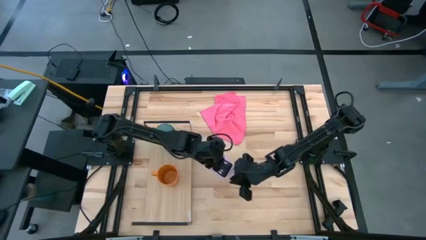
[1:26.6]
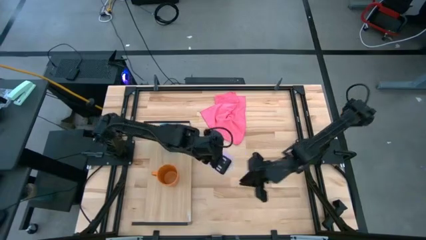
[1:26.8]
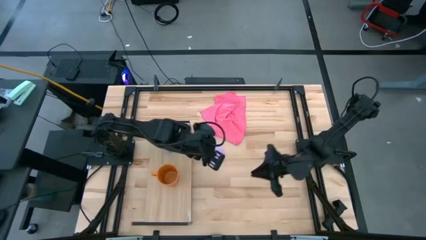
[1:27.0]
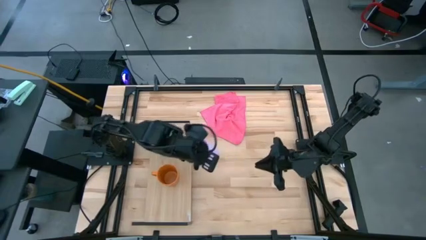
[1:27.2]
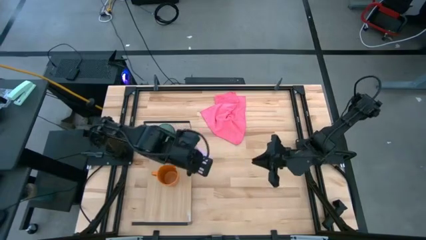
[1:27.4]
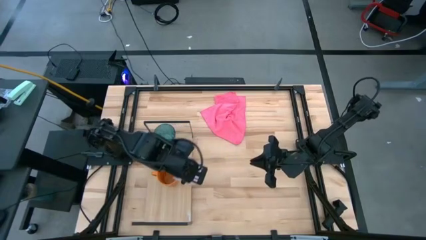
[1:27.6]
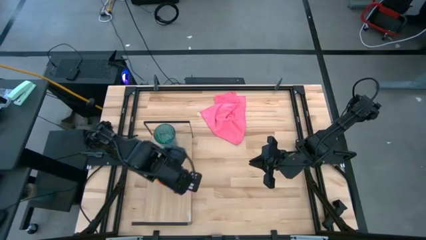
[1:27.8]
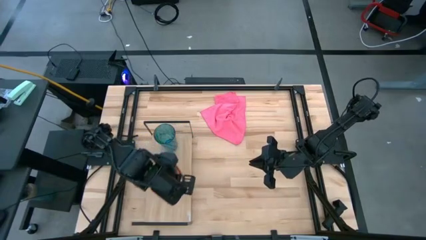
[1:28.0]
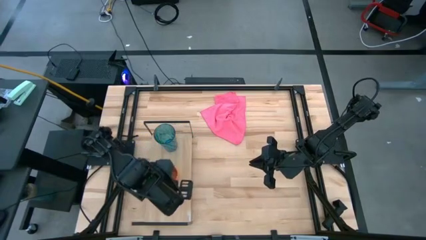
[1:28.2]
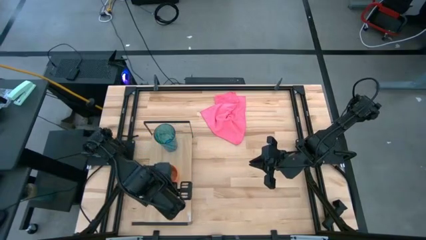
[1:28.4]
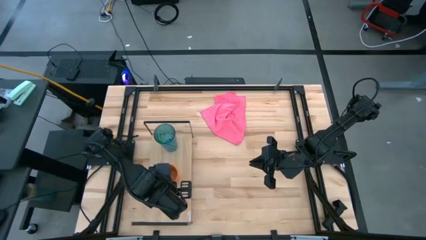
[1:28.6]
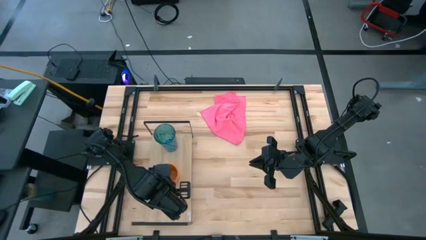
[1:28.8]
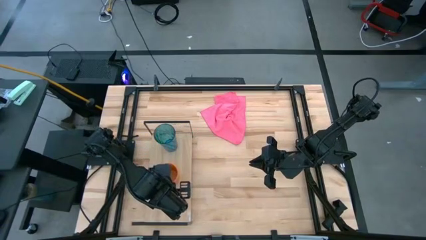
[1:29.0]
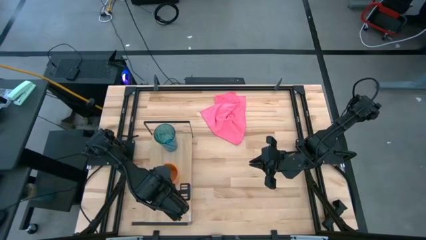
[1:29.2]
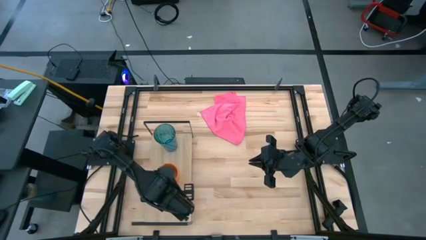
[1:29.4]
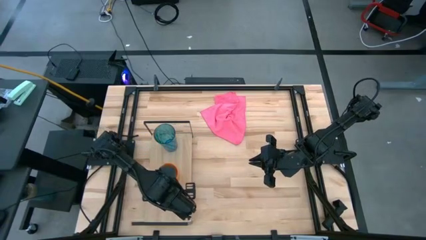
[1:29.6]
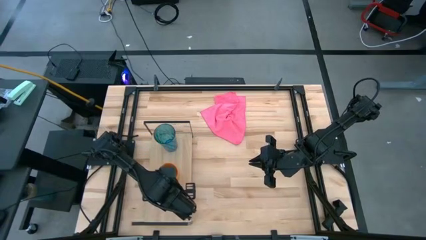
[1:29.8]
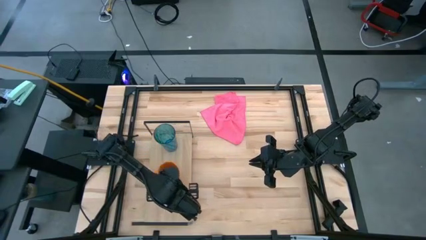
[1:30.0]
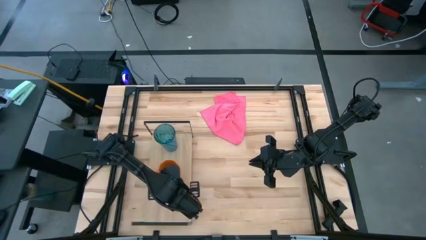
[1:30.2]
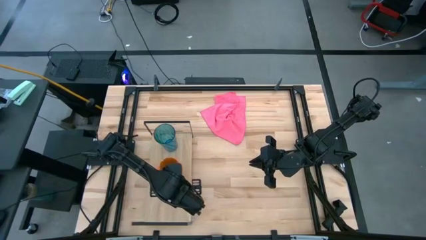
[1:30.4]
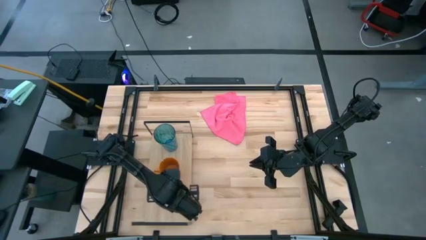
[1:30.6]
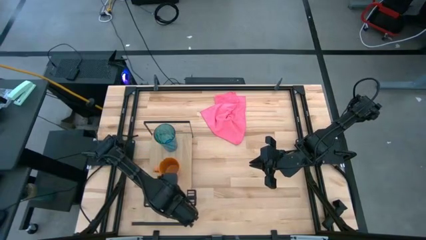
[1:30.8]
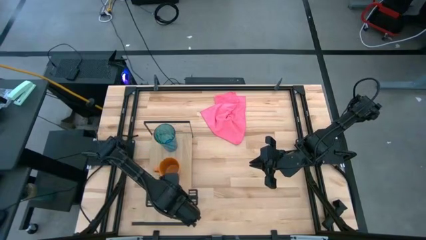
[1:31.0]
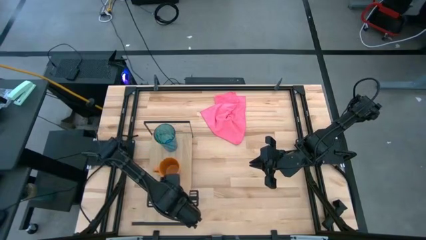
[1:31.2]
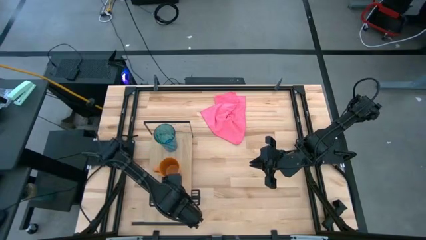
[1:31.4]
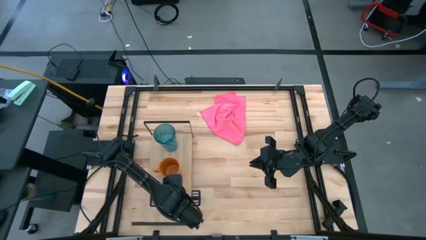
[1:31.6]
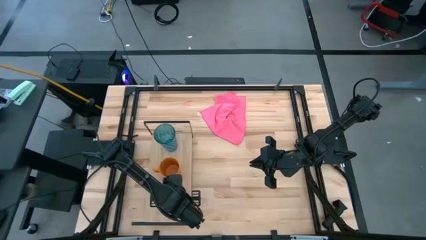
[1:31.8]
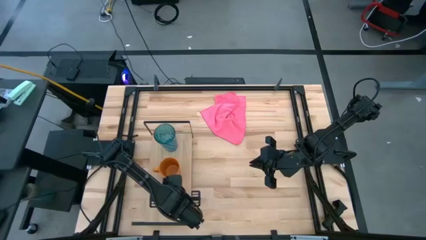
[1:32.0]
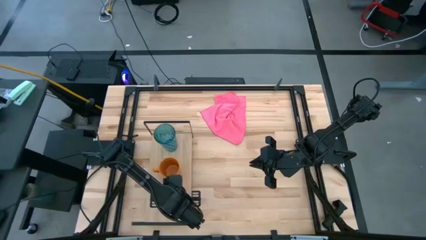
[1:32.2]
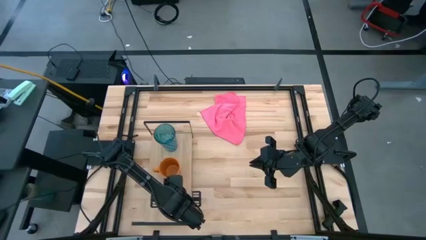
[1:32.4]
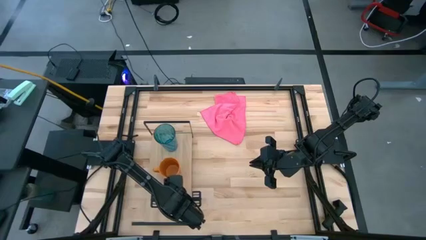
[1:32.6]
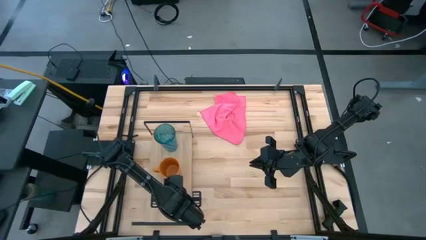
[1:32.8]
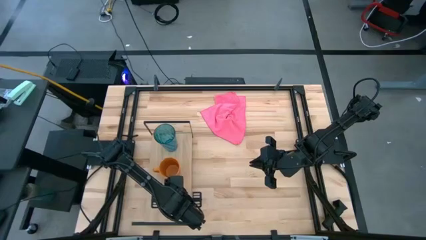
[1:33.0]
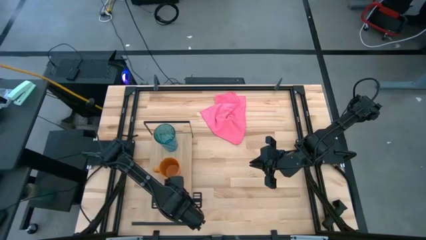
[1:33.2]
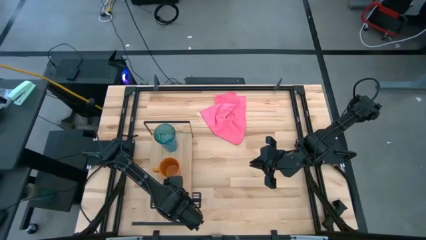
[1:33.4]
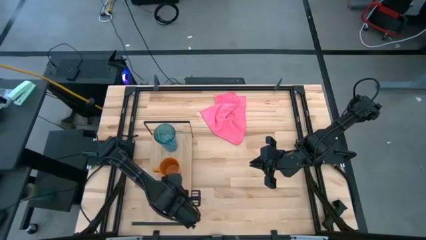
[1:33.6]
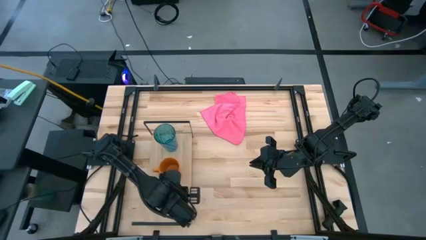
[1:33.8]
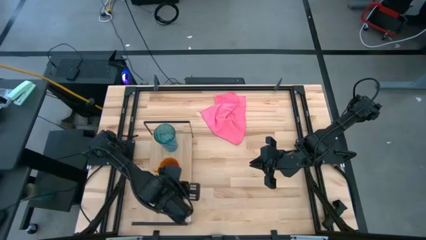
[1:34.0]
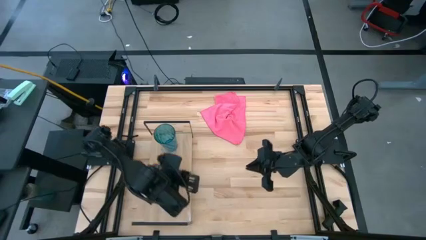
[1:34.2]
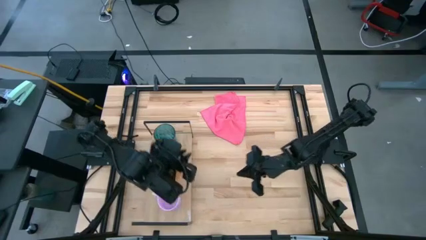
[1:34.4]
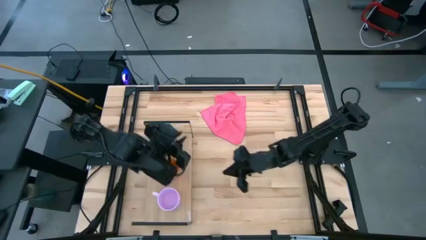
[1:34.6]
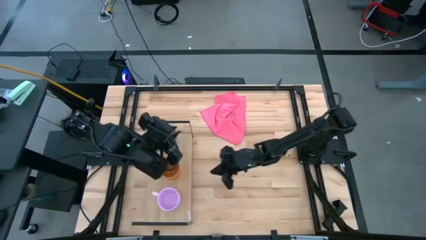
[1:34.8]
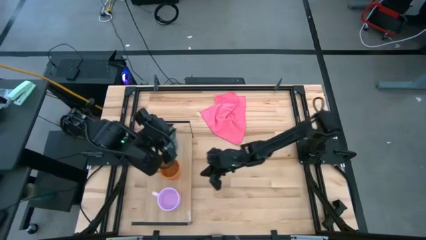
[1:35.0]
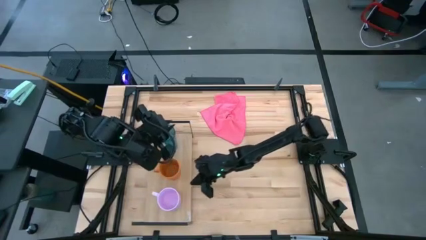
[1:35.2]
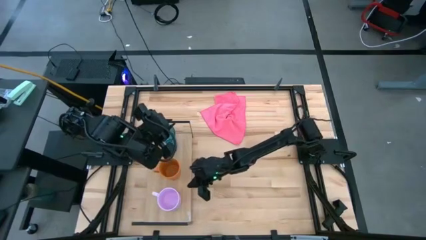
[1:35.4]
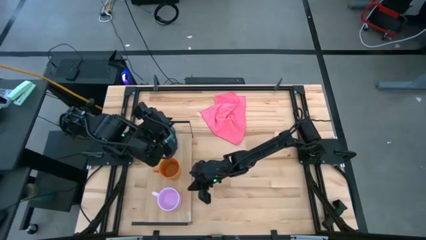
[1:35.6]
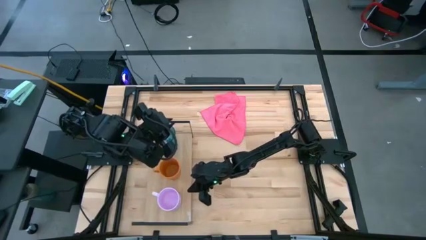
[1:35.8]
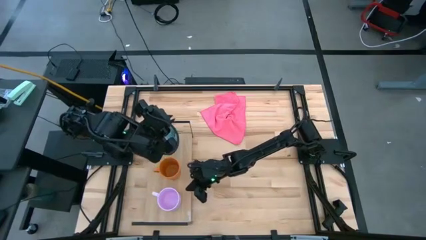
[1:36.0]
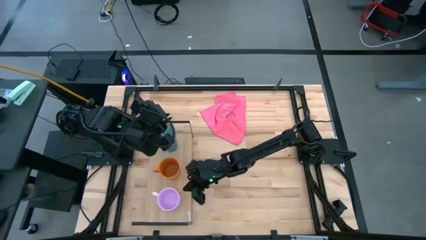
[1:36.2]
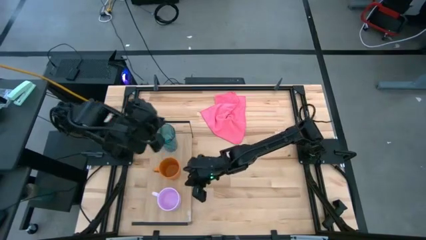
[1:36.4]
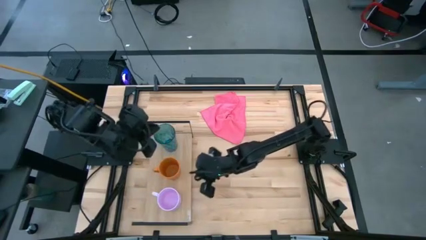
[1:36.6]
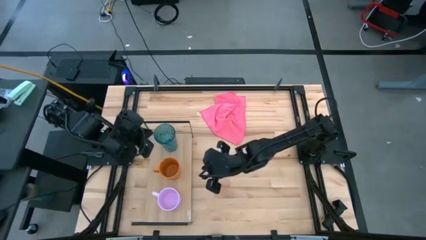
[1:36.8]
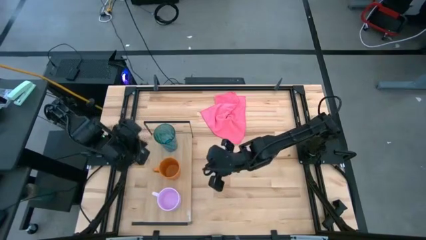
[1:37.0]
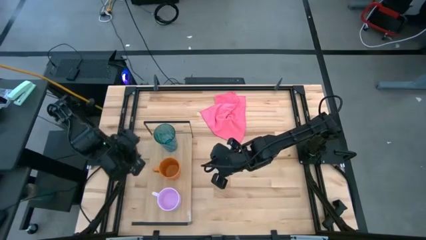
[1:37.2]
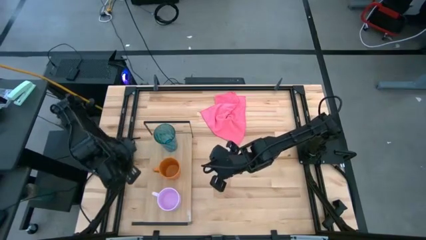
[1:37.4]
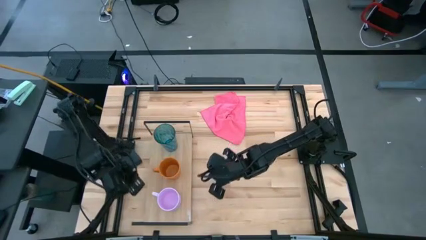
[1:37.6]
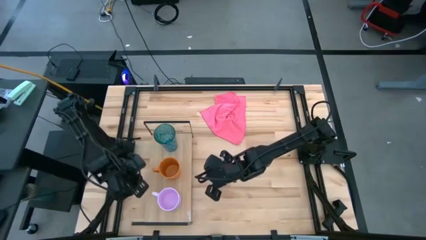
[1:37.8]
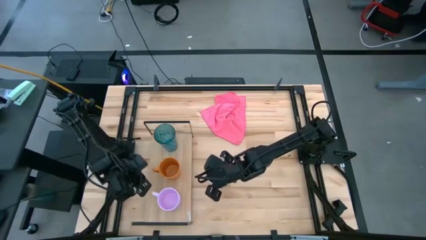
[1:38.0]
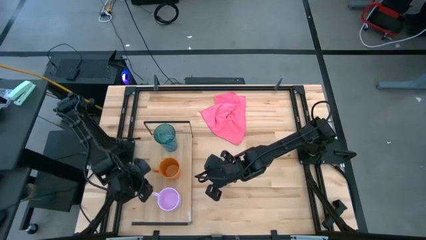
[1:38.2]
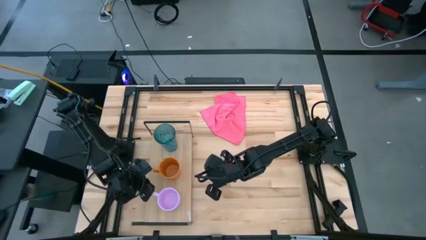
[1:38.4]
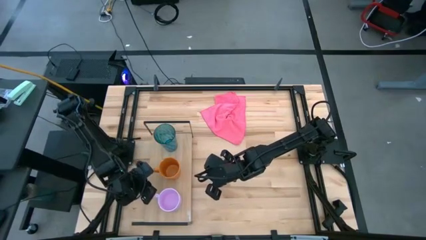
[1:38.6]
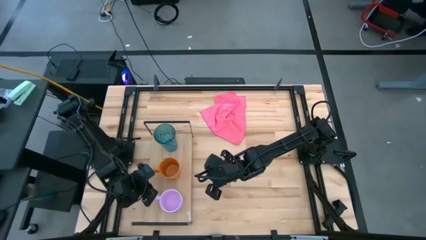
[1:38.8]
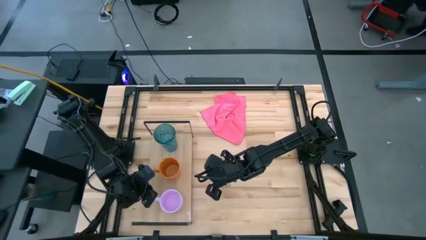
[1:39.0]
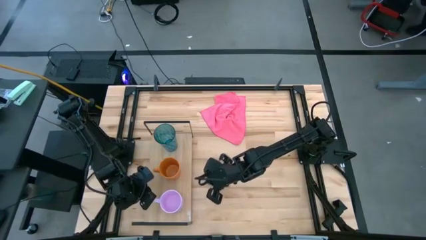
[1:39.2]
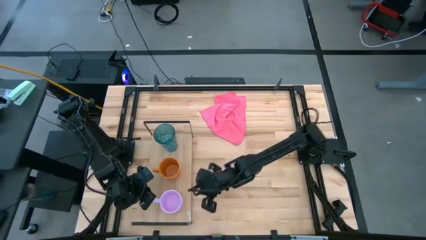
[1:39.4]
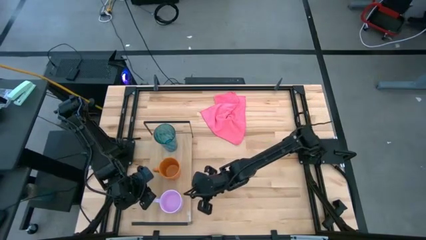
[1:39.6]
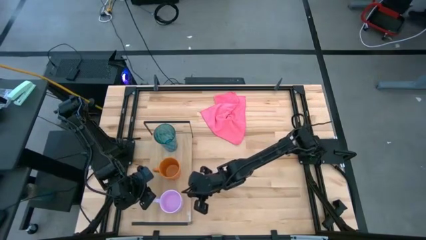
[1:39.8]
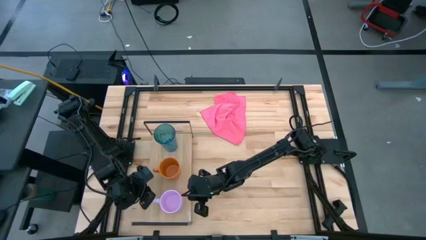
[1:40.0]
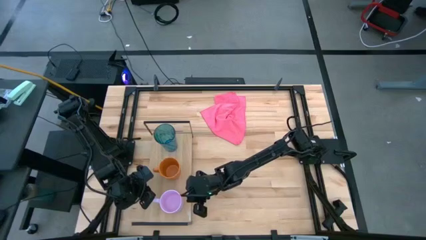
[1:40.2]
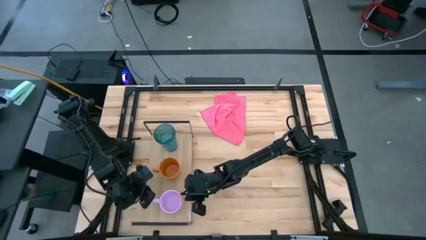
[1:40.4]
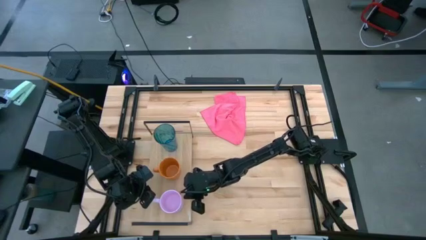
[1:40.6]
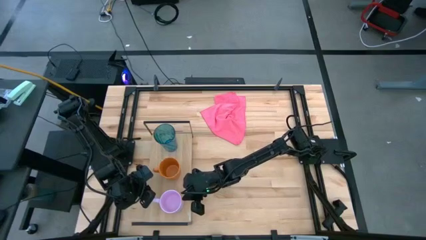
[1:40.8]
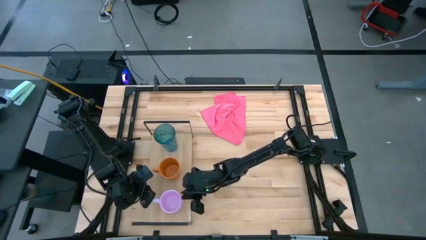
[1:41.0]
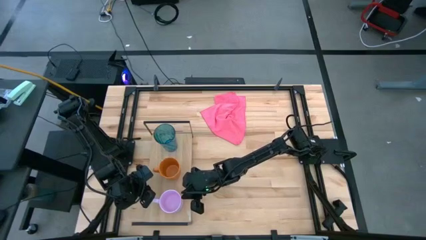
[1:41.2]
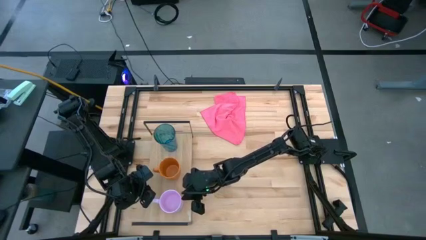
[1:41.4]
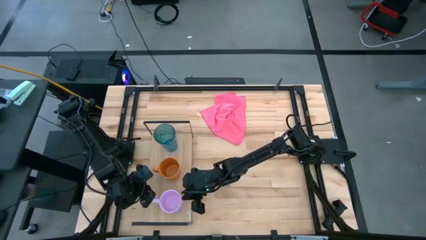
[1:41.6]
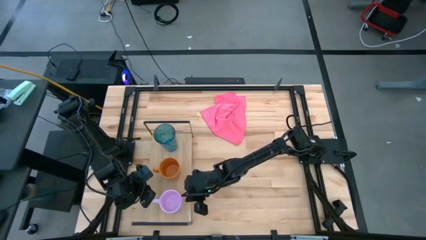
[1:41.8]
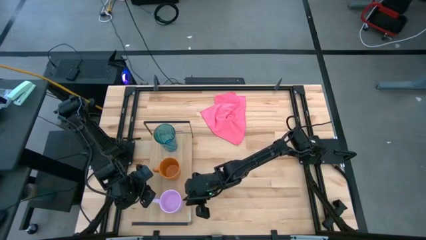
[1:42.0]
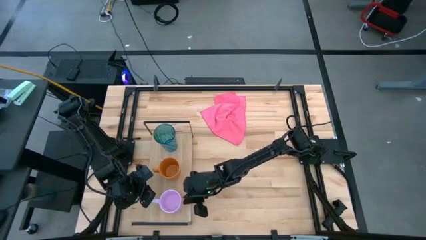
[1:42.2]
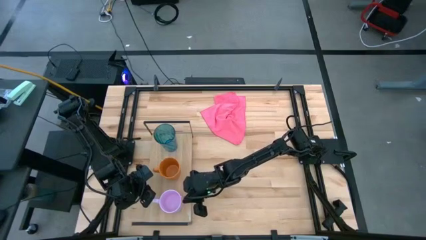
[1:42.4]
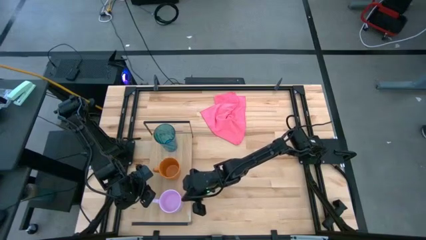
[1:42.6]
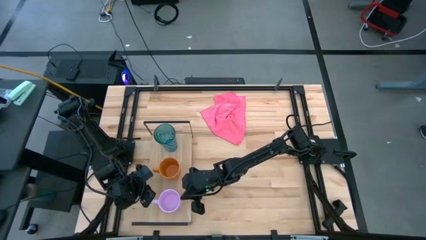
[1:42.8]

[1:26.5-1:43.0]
Task: Stack small to large cups/mugs on shelf
Put the purple cup on the shelf
